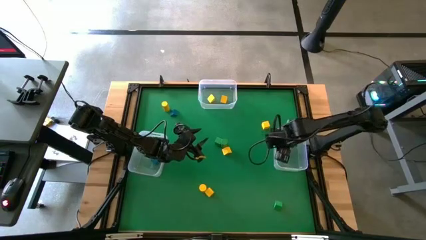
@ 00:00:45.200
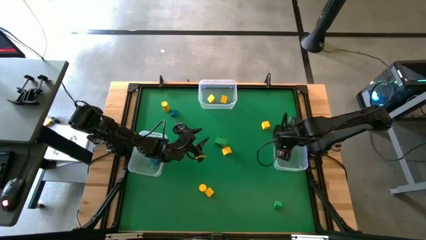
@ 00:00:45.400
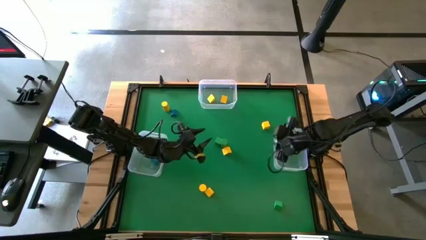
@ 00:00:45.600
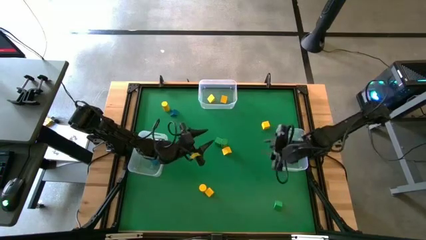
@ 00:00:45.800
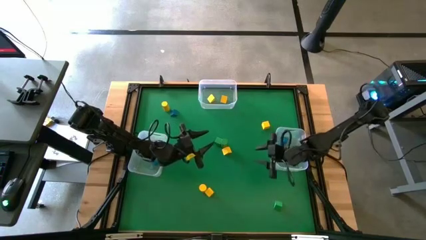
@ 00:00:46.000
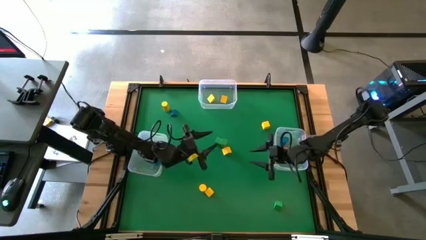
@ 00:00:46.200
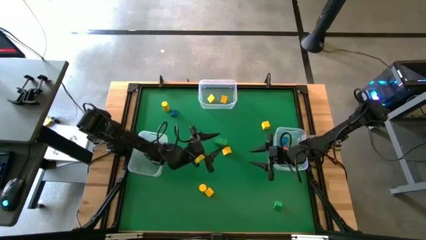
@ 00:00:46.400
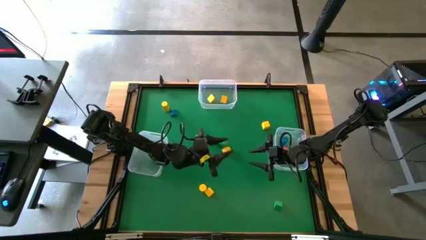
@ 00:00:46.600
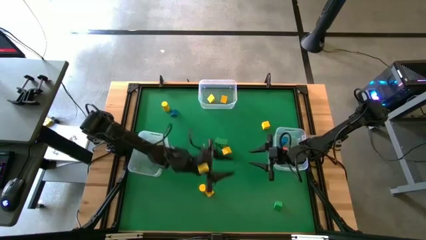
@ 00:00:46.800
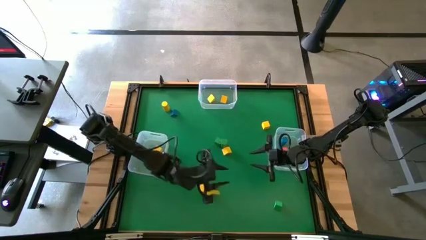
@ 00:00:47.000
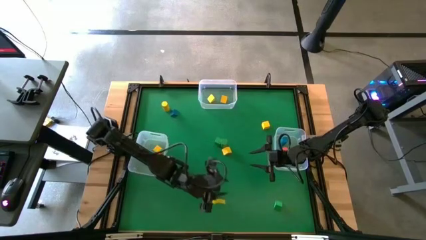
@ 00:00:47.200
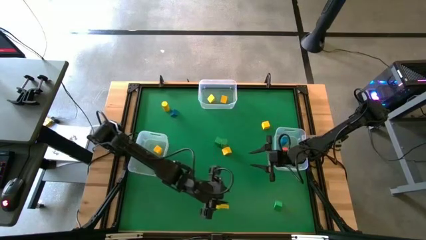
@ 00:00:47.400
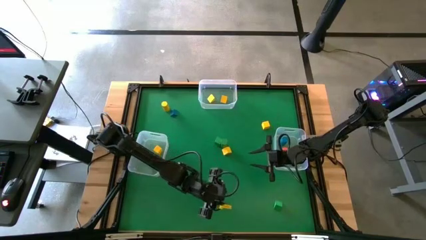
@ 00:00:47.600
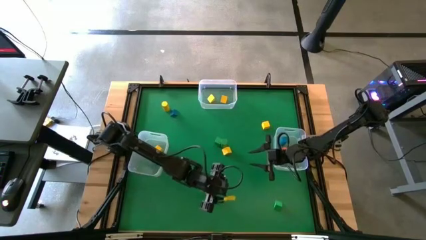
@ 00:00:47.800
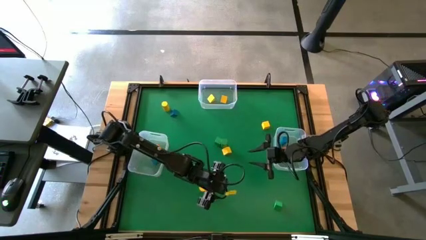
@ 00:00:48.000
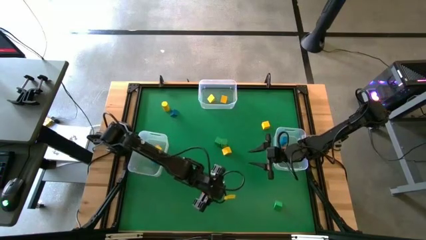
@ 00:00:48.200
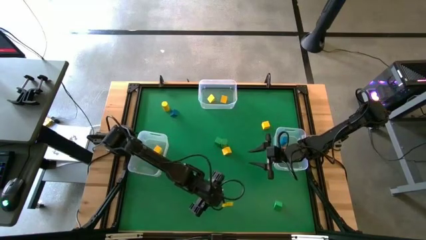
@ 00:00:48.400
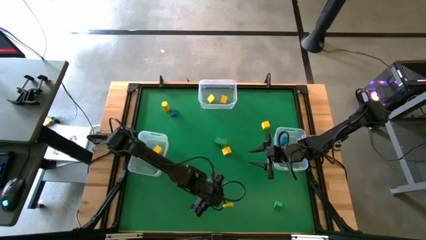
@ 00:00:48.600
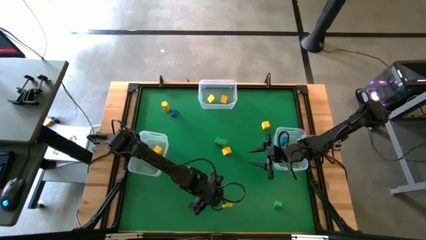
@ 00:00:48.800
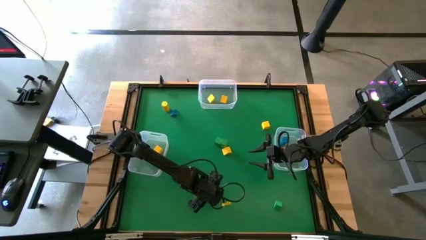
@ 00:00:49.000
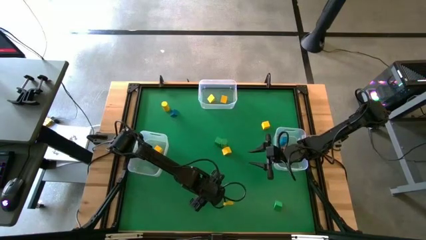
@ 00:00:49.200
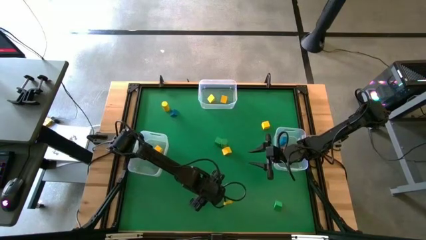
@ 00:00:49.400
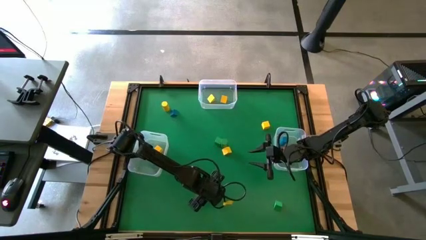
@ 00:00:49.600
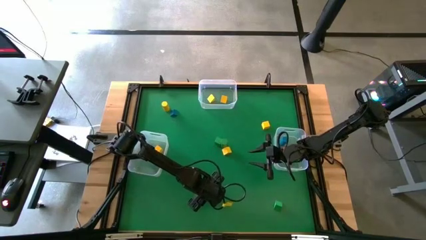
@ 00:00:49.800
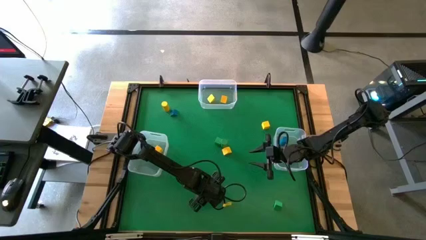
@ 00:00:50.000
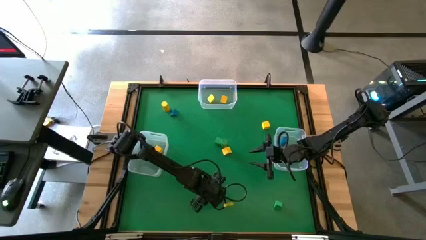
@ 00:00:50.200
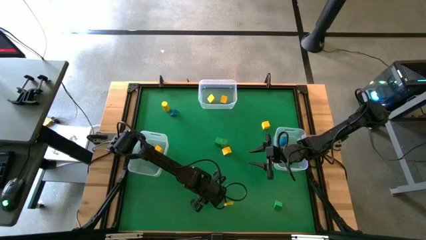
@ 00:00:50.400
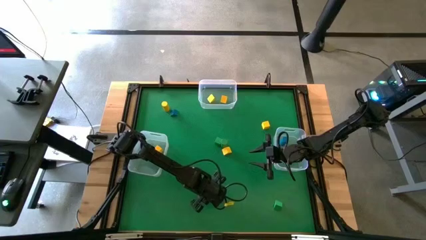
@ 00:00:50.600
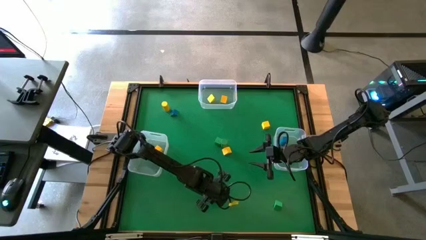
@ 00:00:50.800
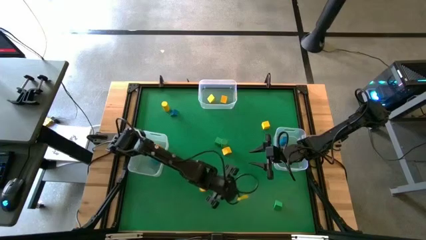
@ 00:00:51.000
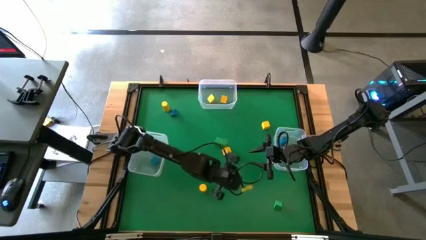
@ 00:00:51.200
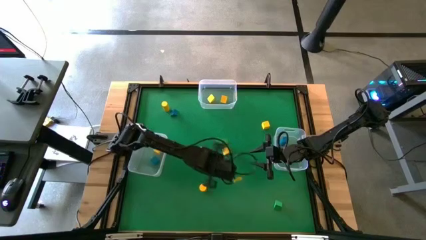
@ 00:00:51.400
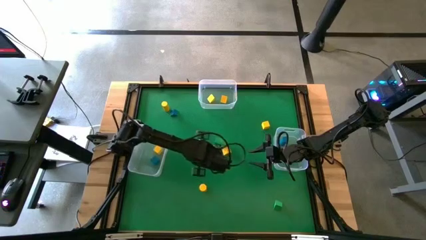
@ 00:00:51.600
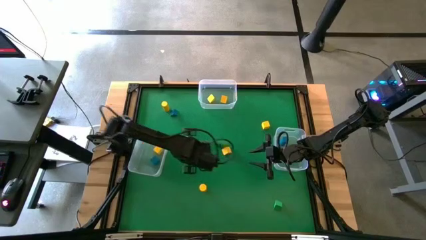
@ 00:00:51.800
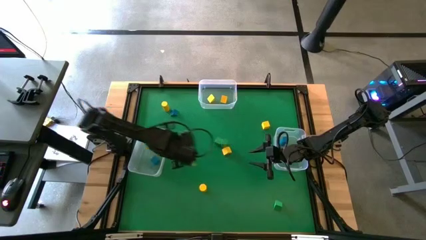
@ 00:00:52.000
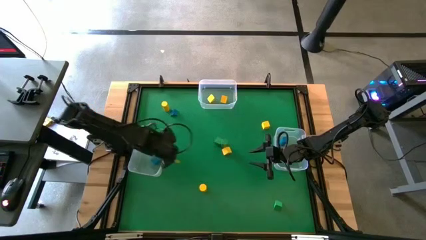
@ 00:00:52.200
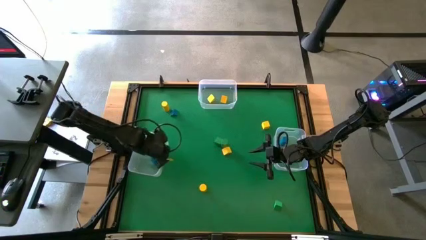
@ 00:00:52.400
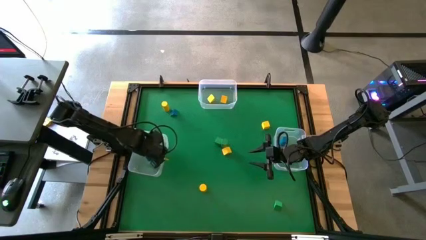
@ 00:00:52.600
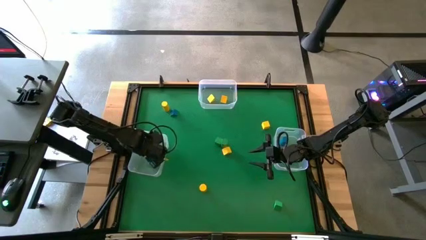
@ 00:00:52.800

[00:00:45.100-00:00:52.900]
Task: Sort blocks by size
Put the yellow square block into the left transparent bin

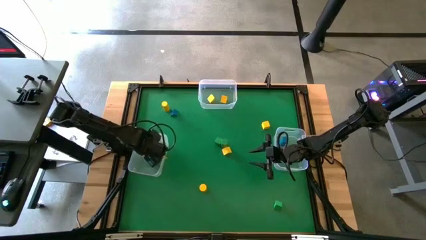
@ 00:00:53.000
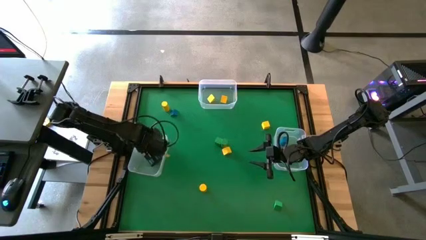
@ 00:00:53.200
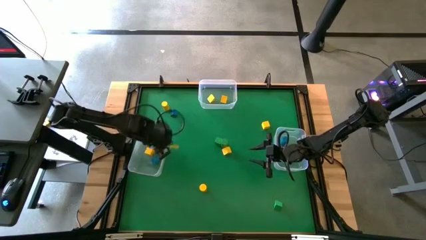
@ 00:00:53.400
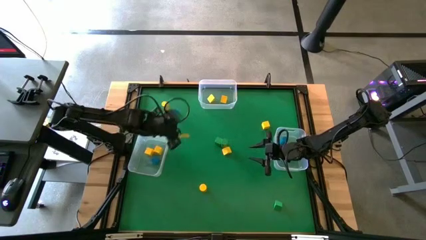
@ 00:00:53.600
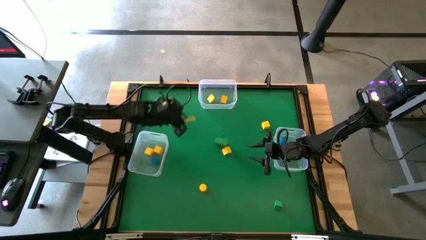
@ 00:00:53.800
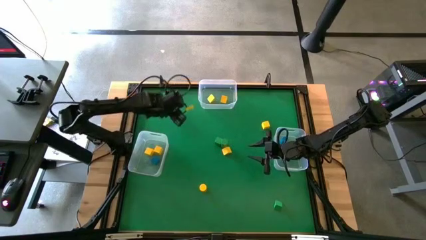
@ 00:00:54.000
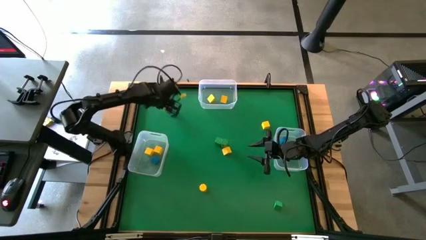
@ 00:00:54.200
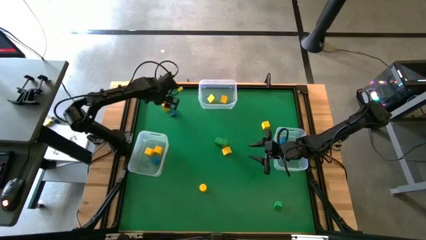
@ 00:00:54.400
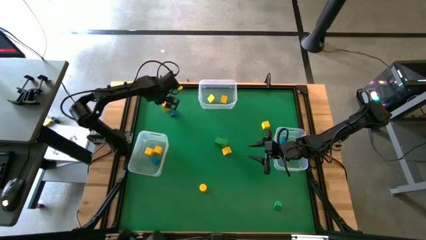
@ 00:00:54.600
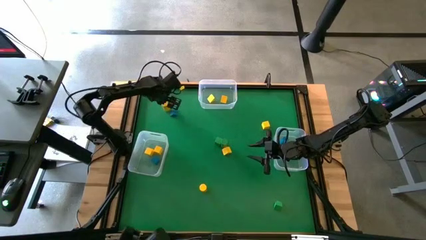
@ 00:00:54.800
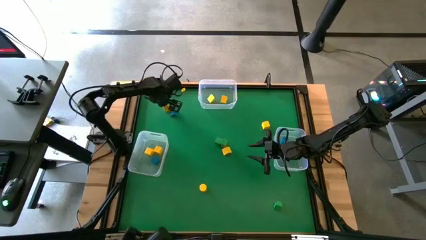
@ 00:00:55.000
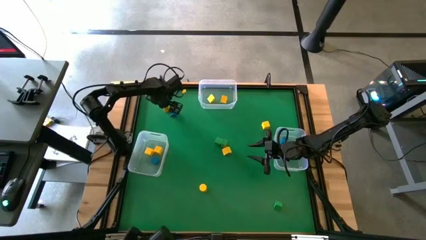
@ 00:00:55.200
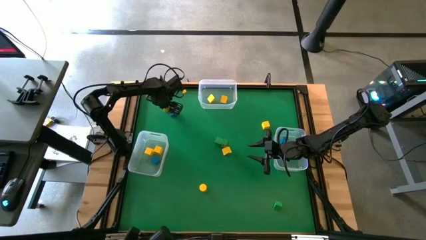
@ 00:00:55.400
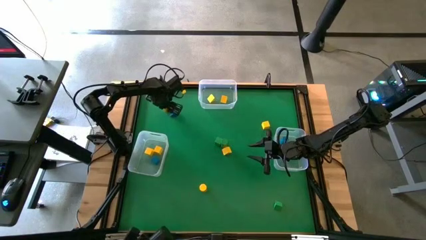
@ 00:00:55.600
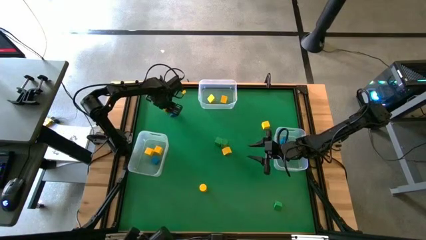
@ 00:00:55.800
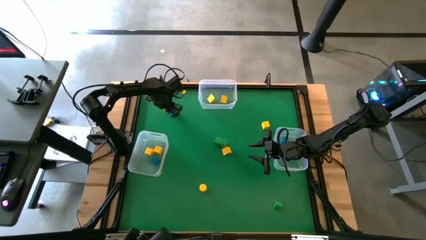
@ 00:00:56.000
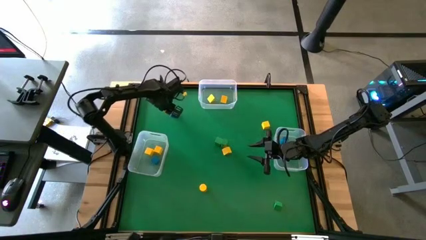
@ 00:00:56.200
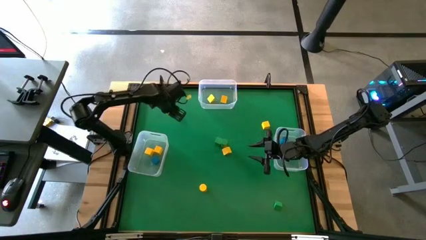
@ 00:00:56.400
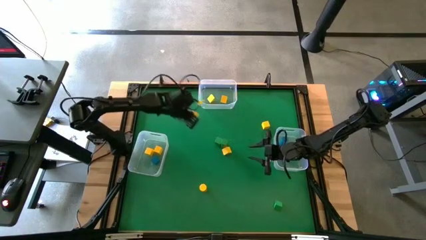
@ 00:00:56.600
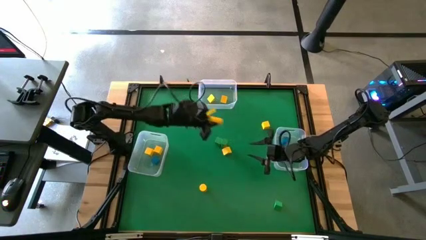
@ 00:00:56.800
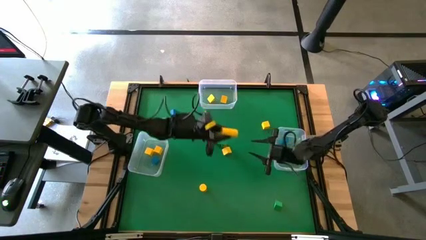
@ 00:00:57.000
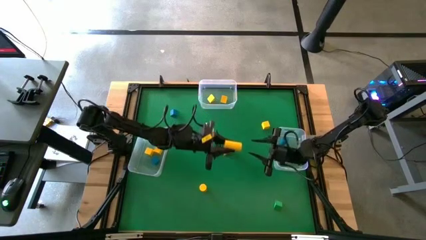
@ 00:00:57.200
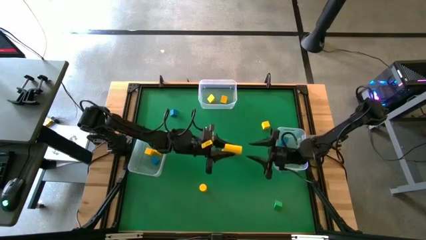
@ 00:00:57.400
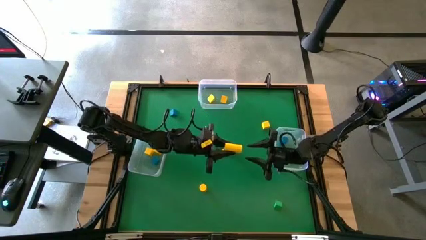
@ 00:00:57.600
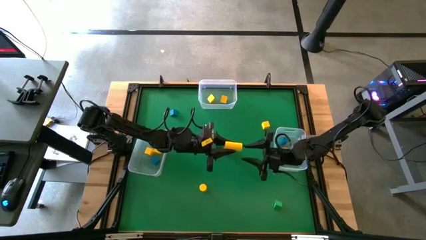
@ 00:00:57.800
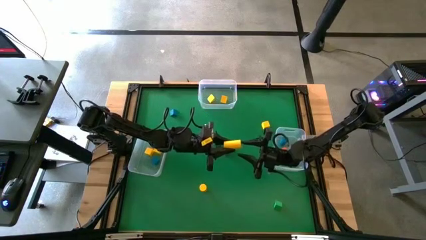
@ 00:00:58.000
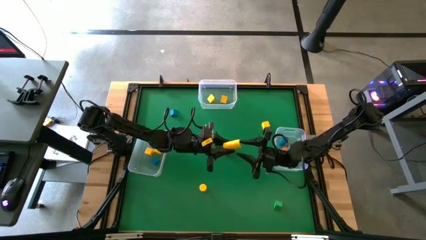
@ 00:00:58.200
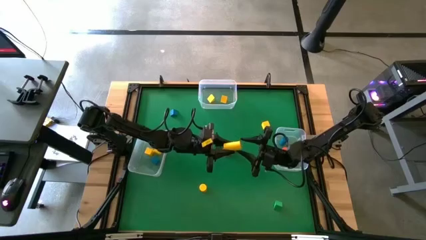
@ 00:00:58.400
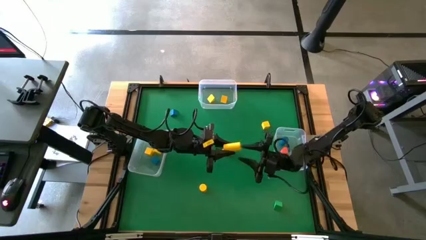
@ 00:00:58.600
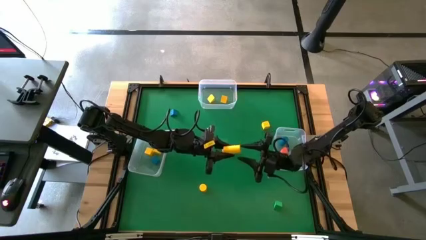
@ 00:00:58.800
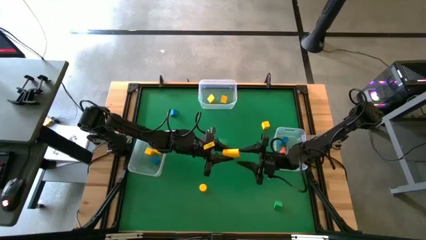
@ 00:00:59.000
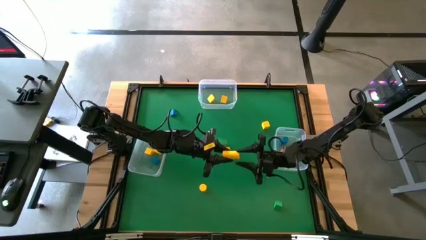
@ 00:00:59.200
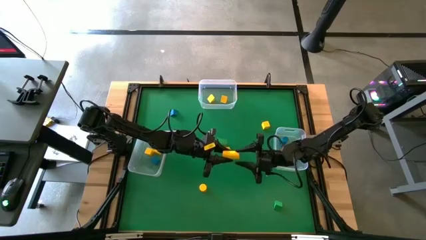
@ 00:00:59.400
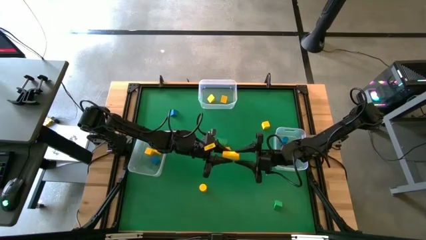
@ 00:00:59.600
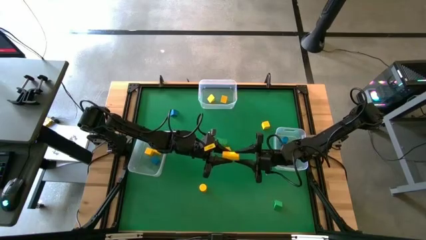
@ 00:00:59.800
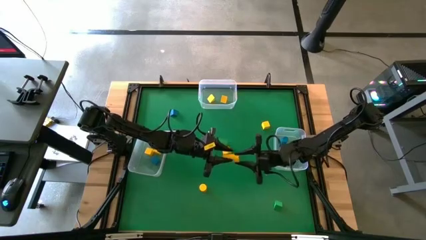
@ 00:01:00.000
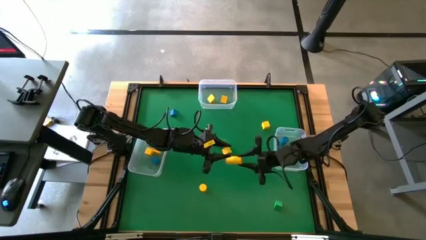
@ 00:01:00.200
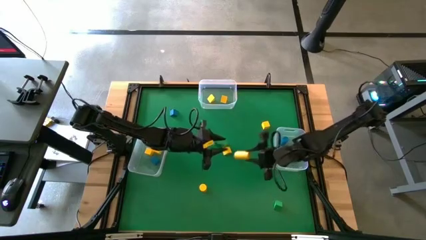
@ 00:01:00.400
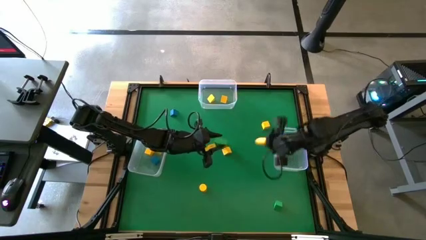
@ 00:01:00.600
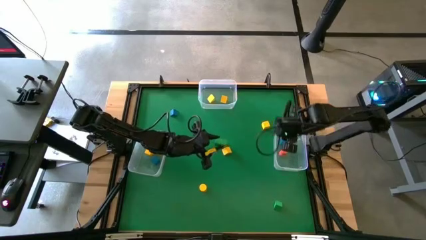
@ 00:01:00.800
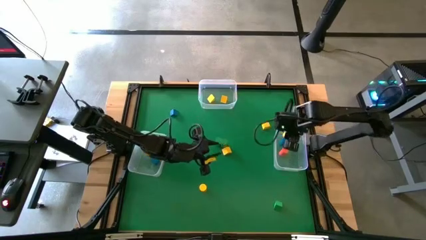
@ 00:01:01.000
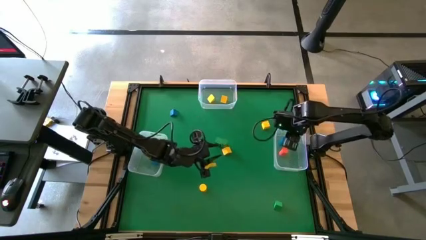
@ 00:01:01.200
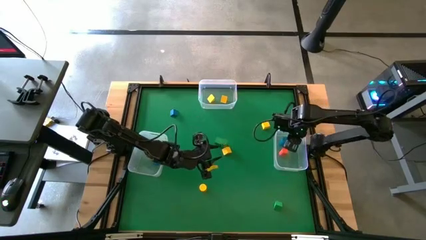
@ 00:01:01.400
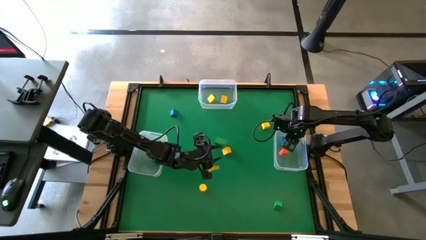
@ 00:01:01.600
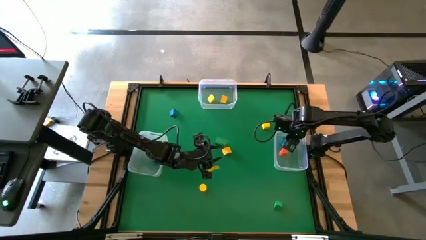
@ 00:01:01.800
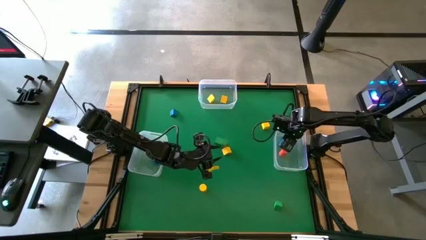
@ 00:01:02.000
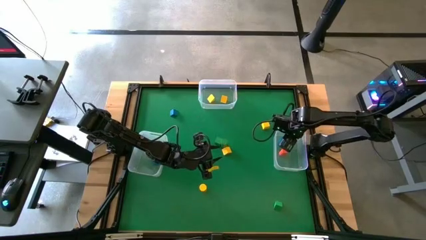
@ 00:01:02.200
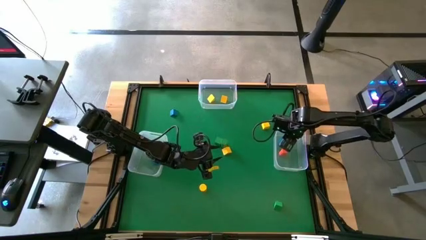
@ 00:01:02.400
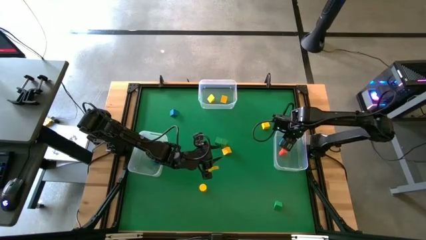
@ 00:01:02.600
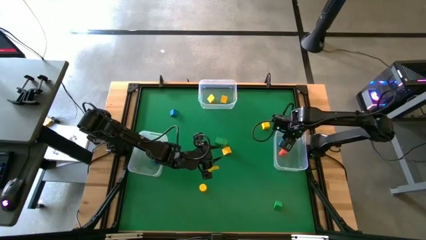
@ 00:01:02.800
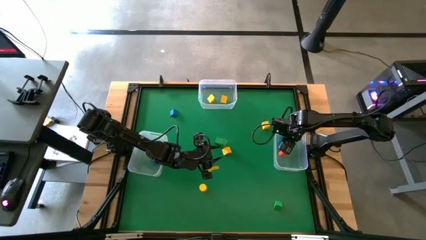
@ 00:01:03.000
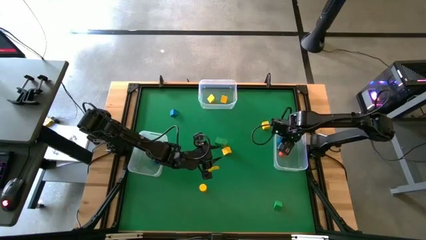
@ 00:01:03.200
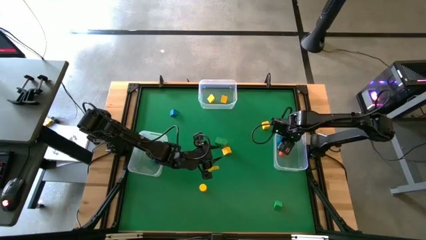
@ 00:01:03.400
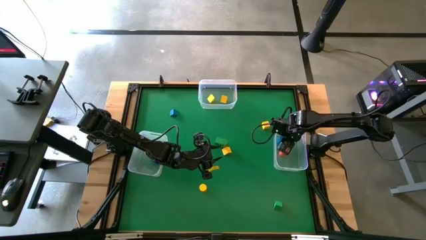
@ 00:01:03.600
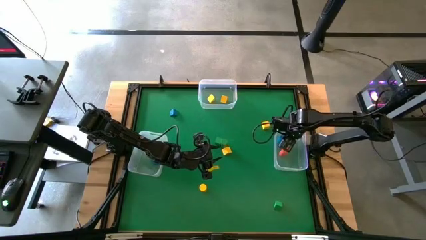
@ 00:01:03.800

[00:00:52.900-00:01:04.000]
Put the yellow cylindrical block into the right transparent bin
